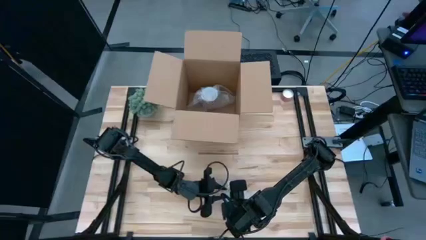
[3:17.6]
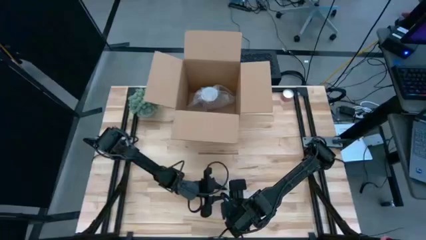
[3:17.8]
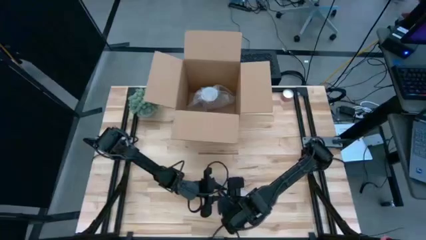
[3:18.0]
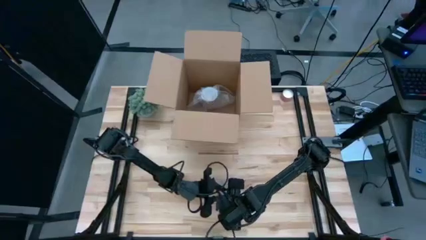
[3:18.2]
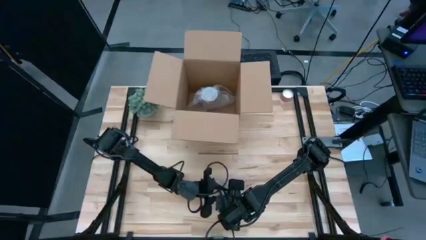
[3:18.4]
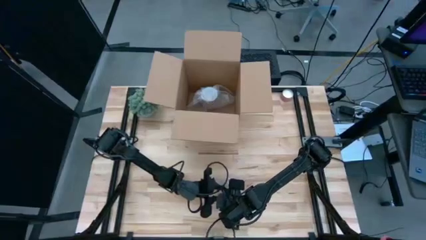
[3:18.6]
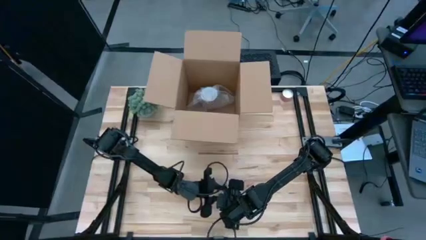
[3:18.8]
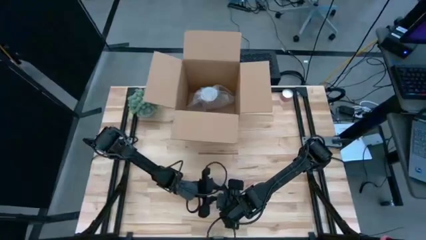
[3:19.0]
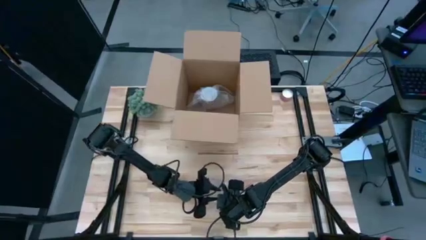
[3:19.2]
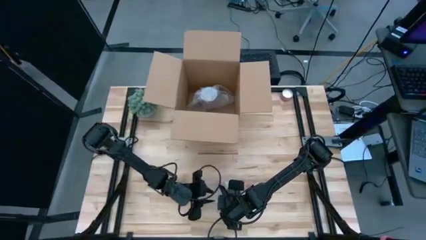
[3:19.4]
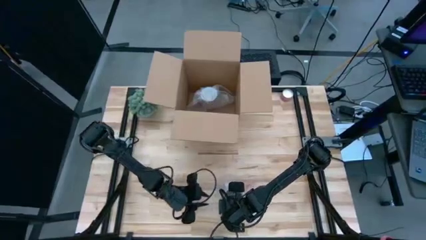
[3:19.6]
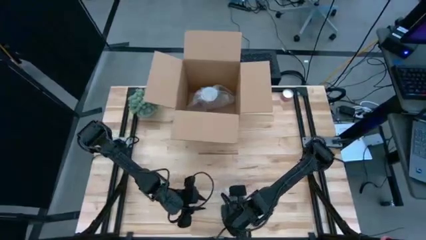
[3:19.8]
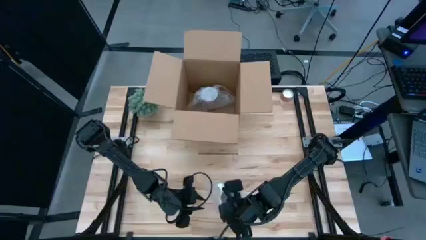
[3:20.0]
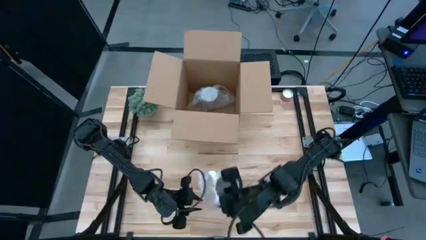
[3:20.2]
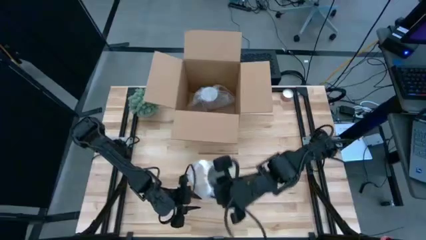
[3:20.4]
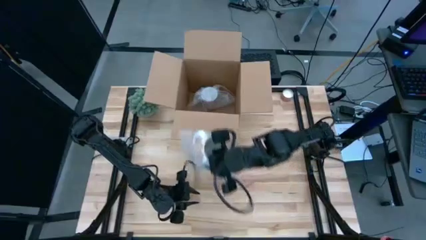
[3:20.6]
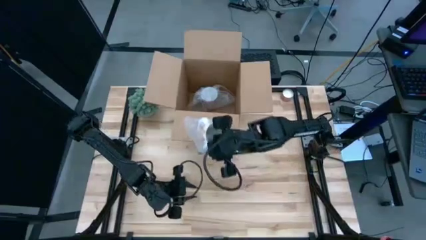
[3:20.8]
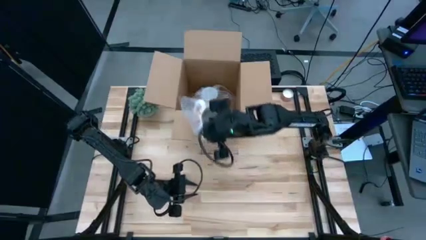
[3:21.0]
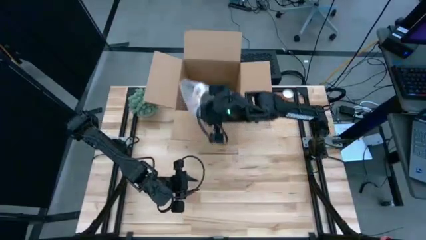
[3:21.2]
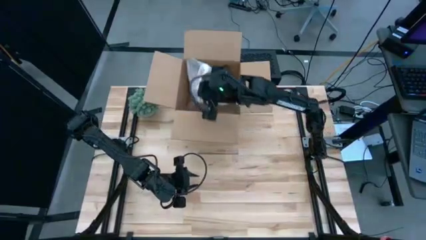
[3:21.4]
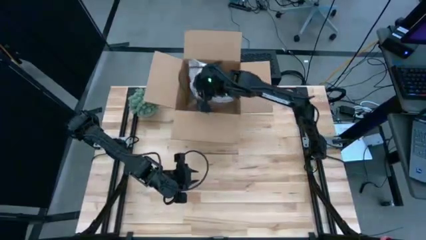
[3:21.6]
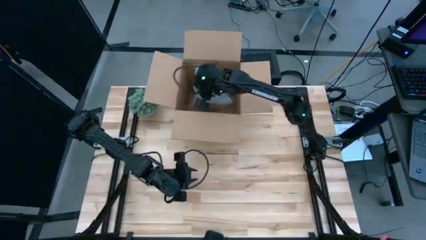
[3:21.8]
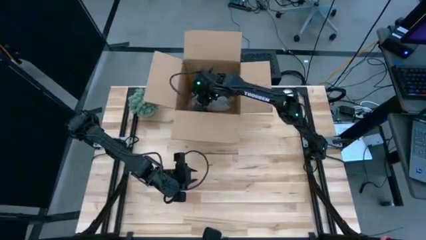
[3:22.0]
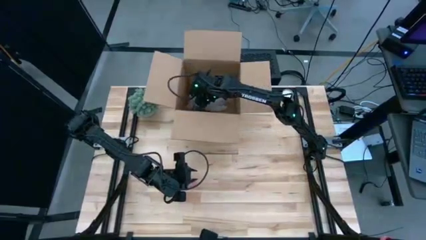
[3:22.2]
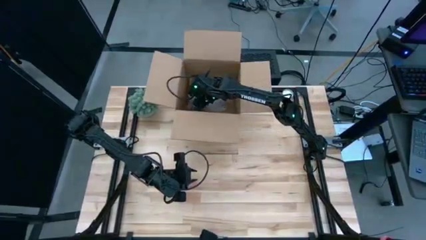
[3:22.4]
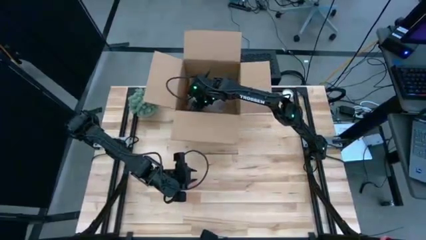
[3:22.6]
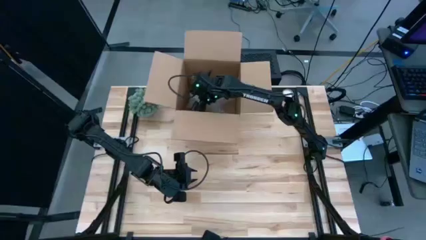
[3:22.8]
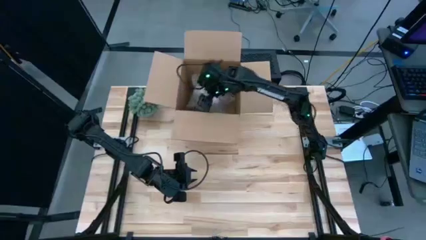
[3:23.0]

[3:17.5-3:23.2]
Task: wrap mug
Put the wrapped mug into the box

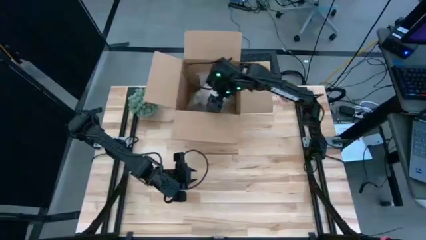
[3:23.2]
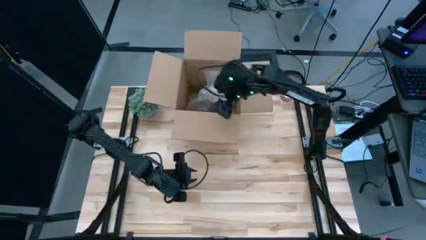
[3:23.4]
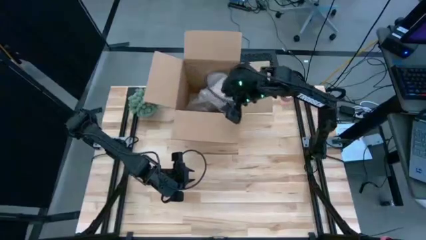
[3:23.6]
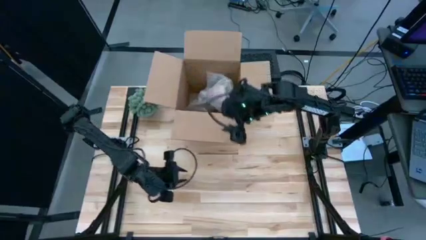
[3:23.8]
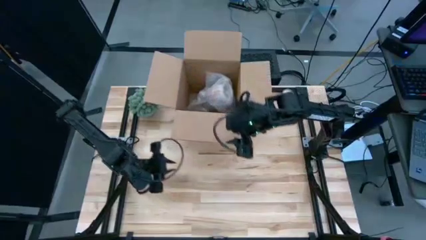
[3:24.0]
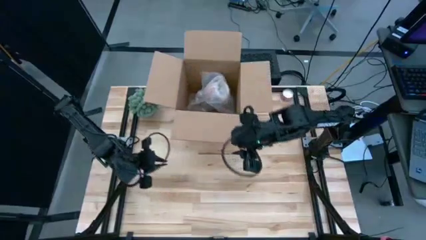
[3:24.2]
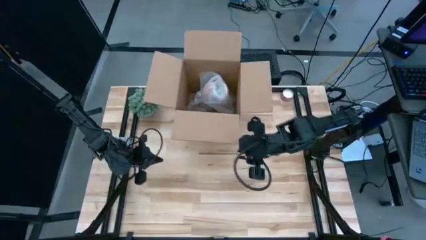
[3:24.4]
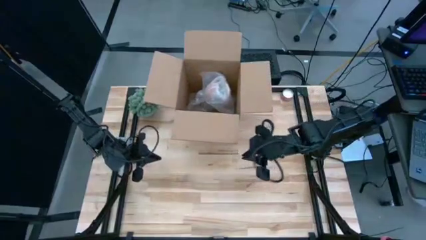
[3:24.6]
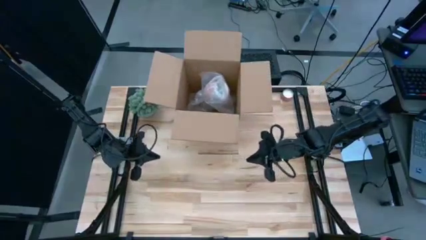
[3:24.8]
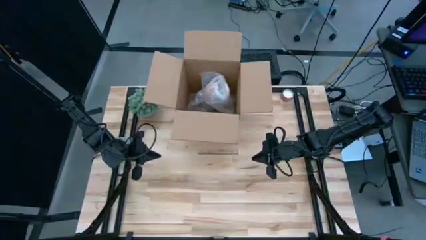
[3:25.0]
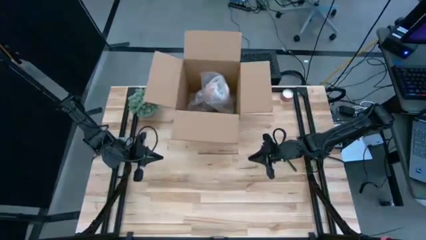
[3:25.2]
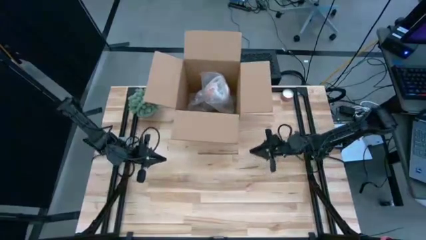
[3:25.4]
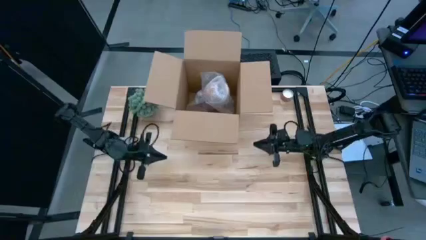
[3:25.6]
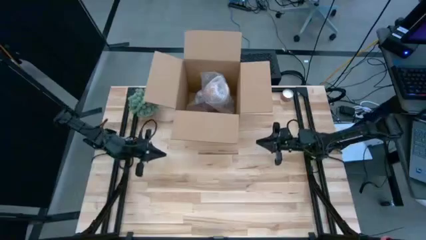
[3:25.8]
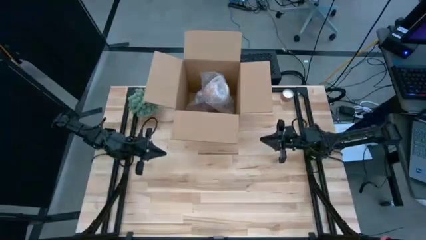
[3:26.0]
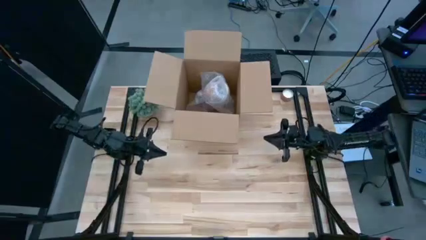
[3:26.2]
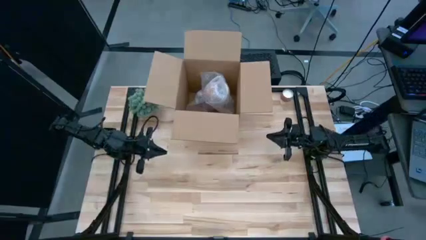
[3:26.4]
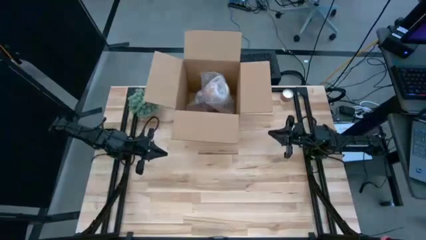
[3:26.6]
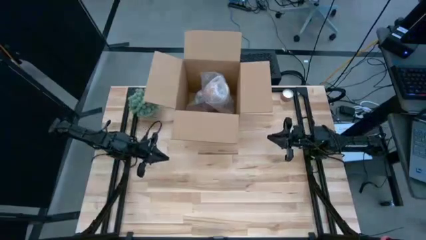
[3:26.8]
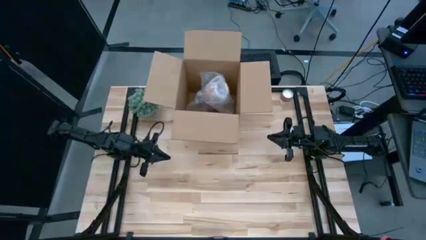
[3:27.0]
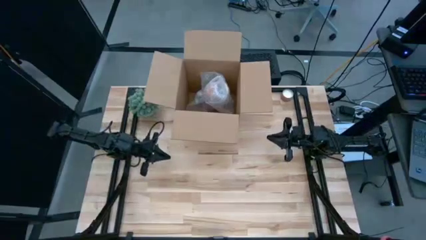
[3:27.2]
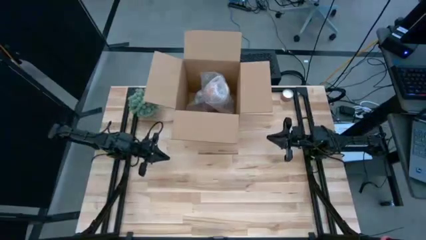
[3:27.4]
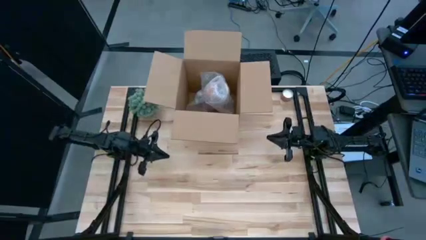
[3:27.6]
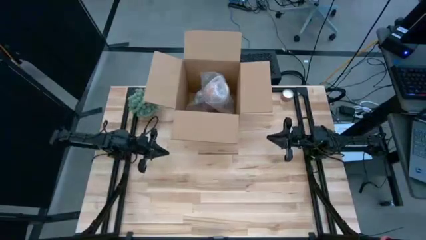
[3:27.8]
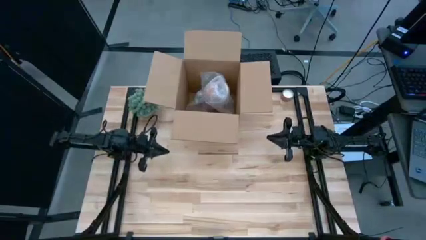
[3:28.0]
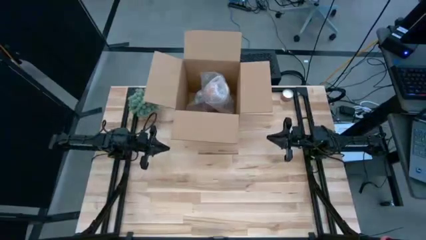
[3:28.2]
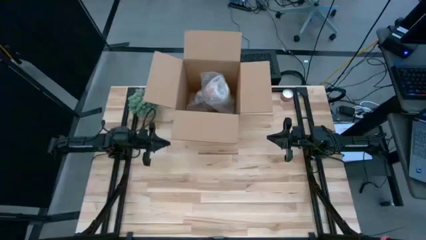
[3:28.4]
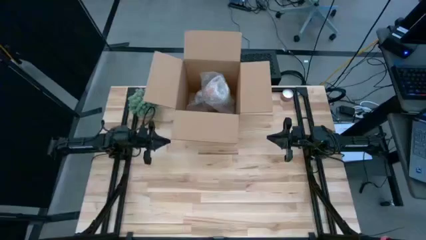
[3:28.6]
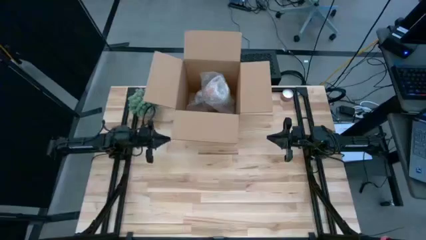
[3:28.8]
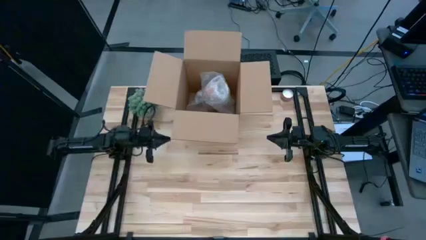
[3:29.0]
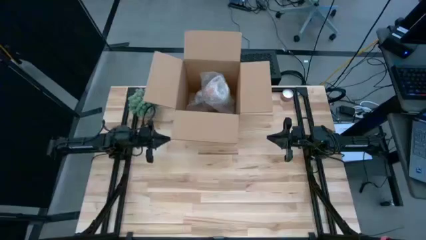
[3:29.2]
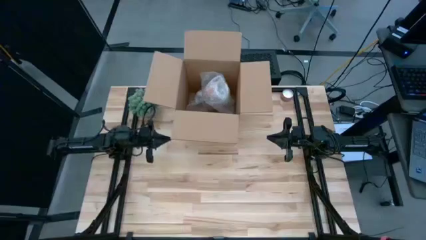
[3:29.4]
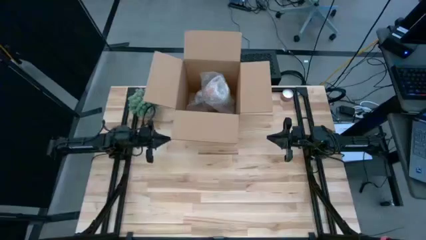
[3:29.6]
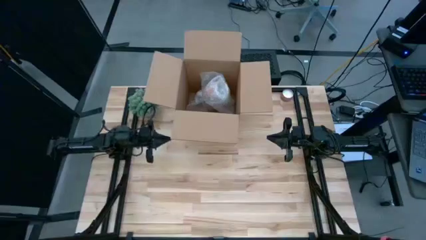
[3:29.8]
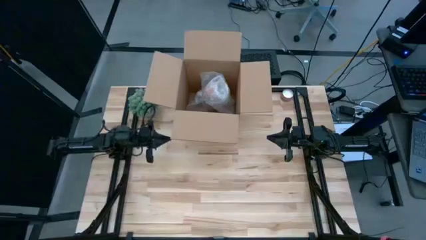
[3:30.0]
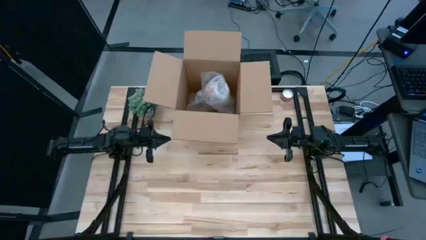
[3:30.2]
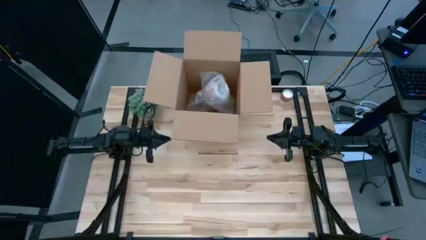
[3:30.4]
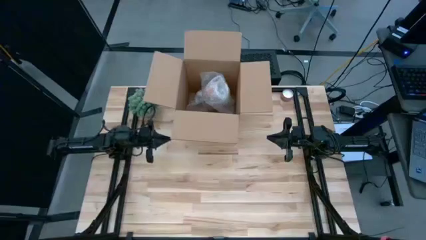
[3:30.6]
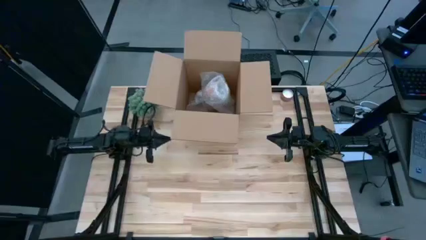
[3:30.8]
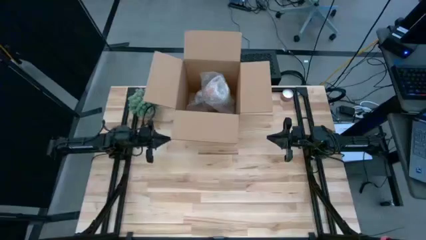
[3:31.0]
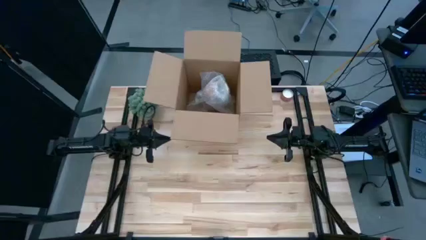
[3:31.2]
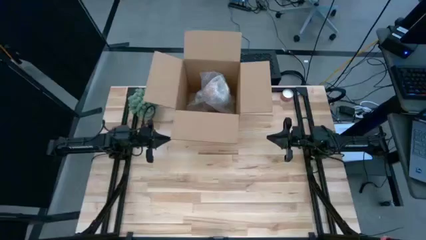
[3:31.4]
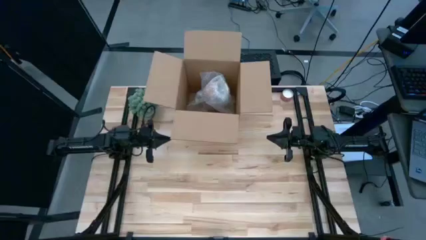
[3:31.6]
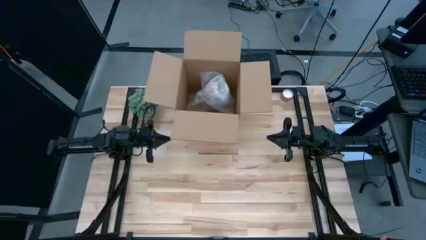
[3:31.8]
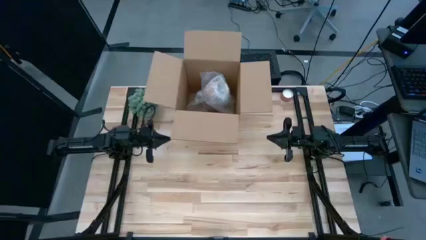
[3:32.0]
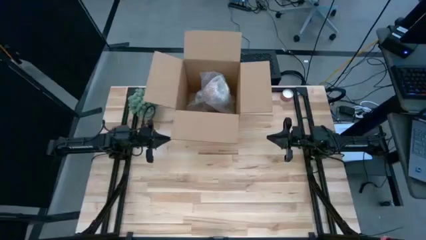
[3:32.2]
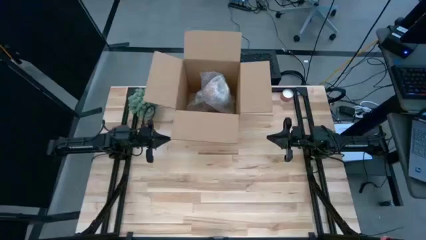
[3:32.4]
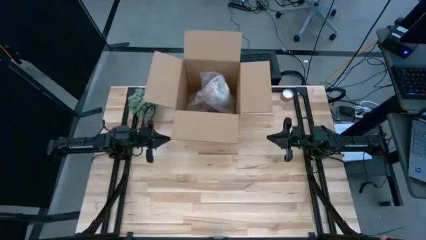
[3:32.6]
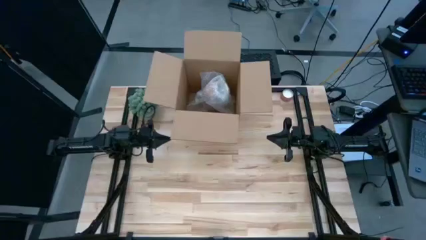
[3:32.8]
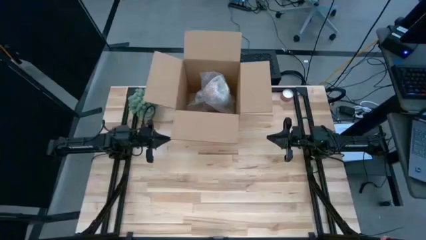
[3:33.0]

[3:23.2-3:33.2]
Return to Home Position
